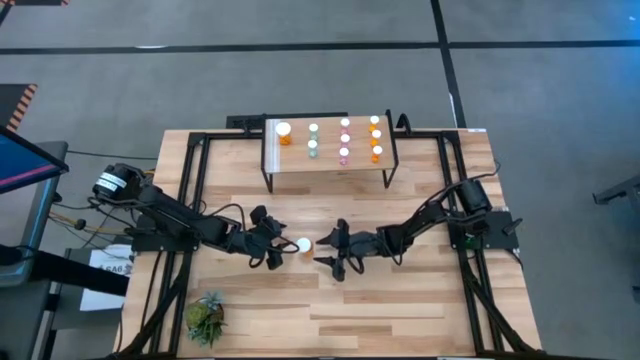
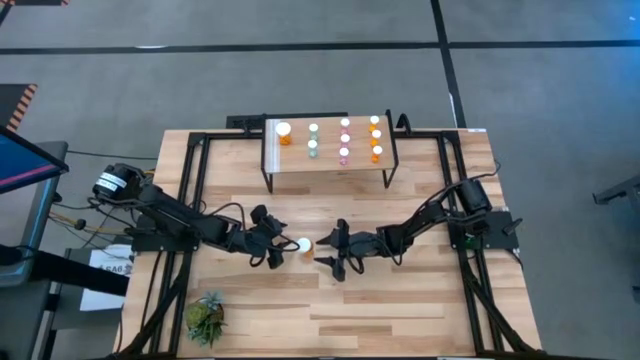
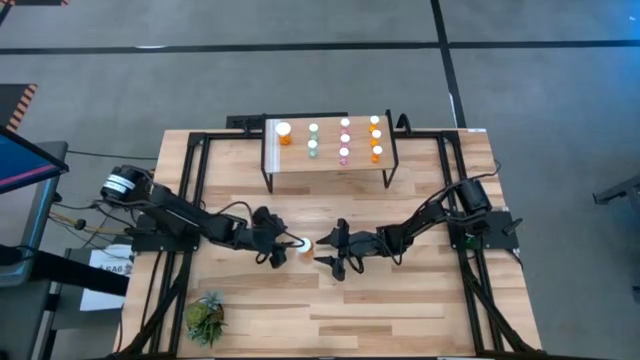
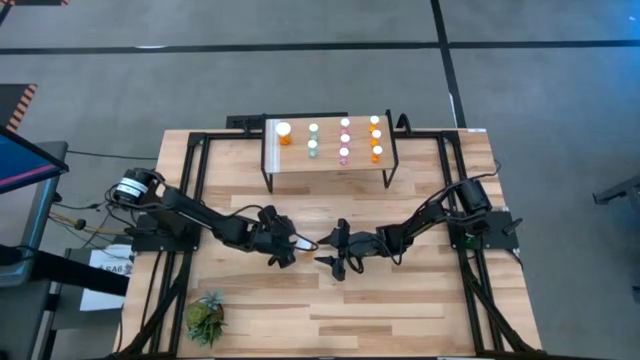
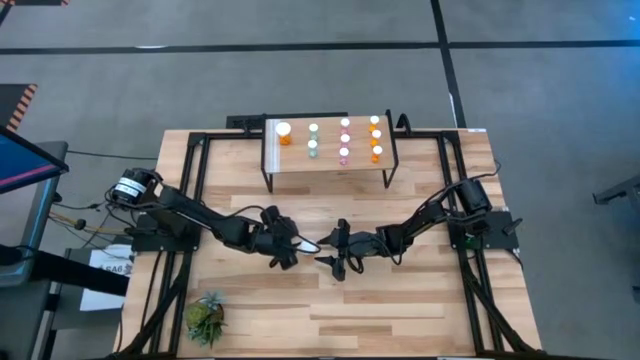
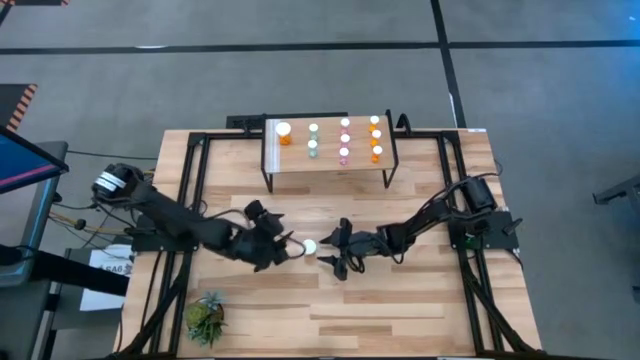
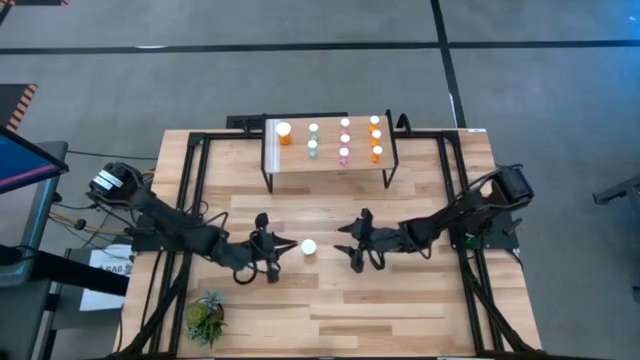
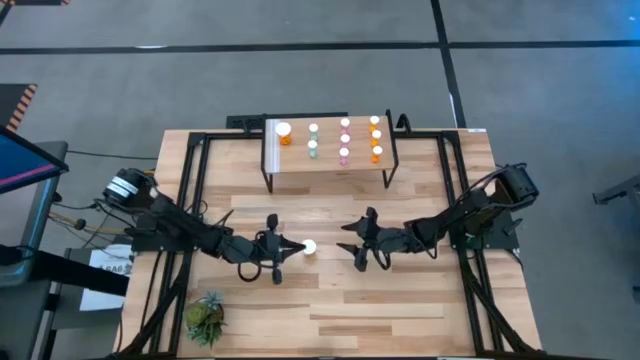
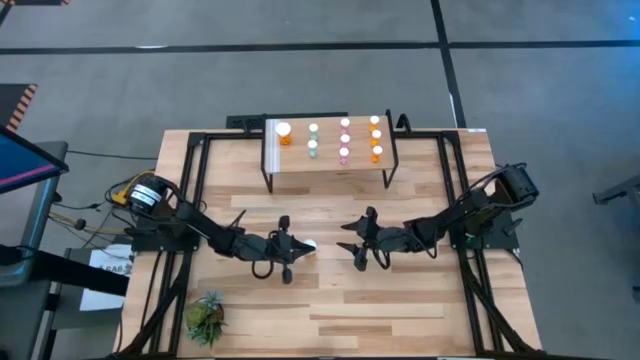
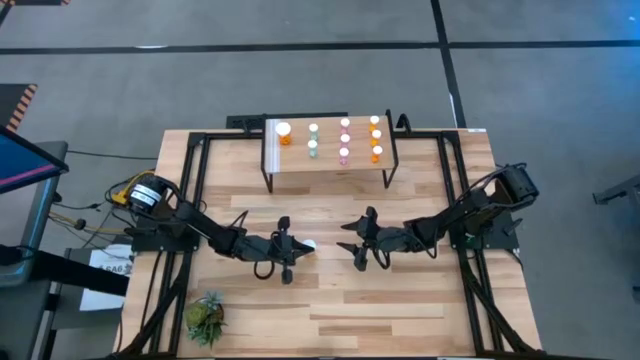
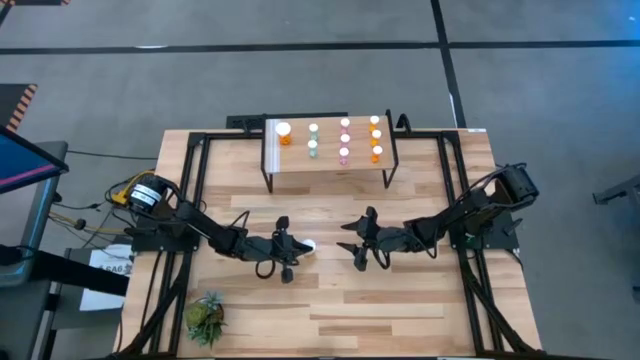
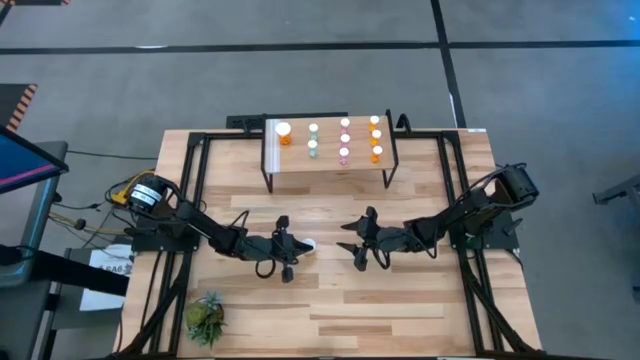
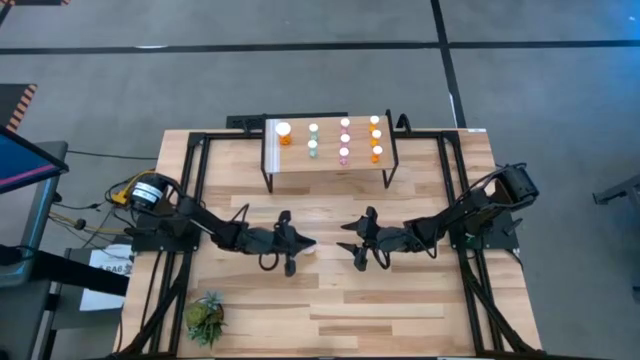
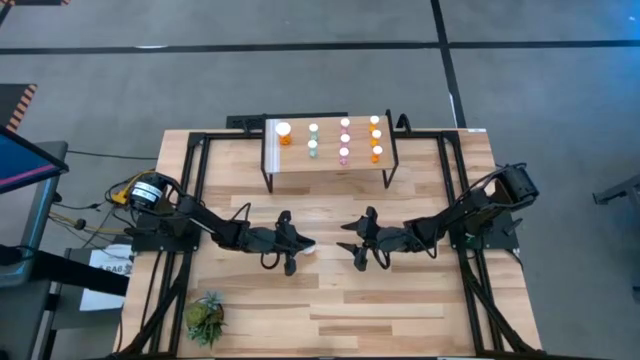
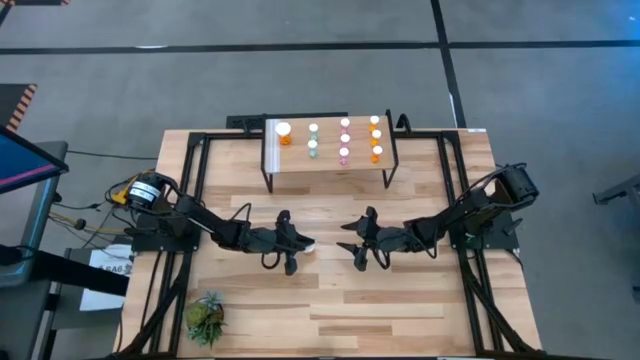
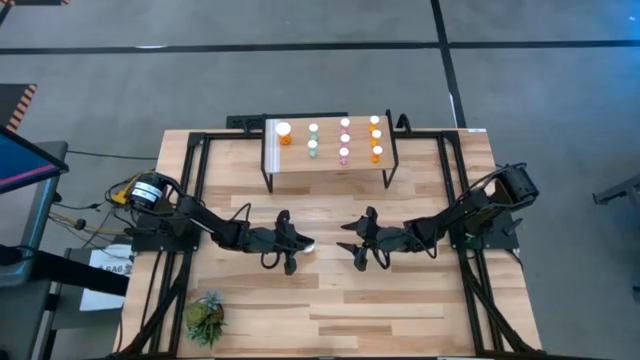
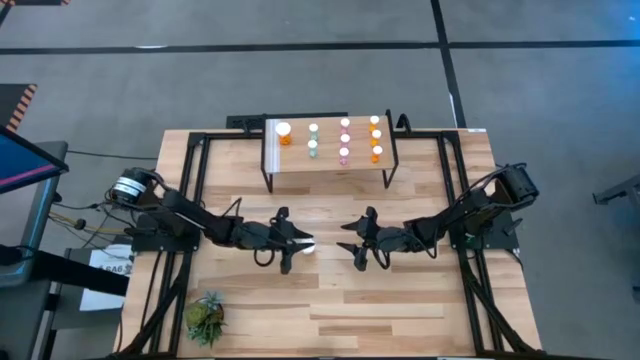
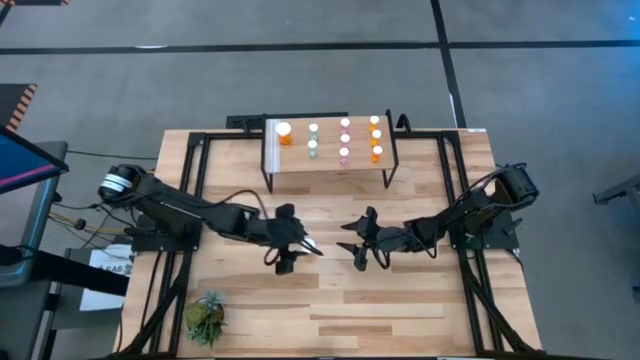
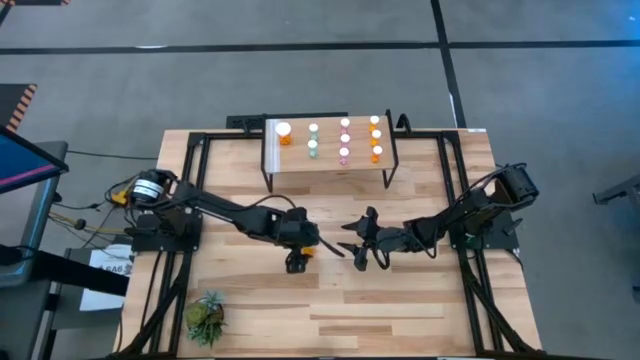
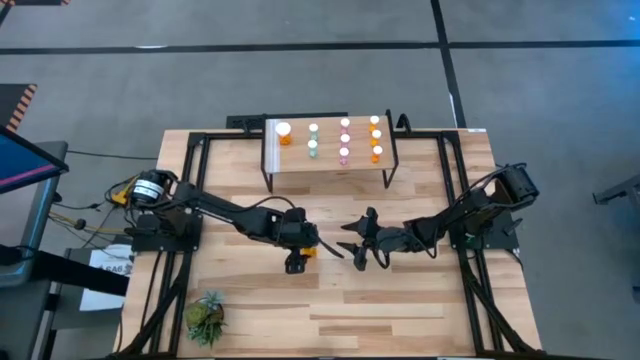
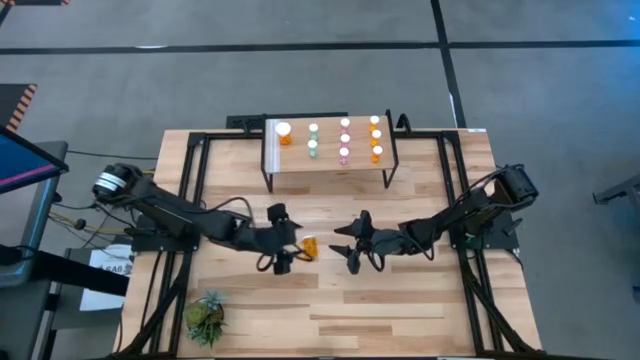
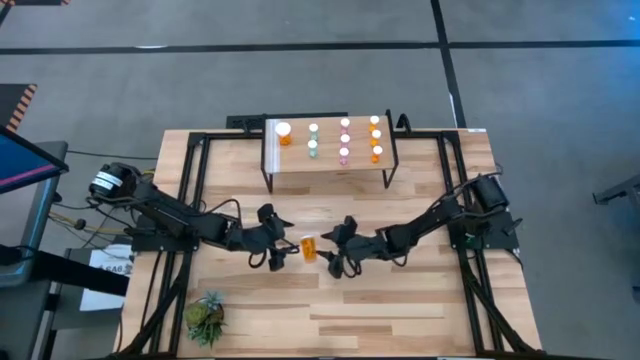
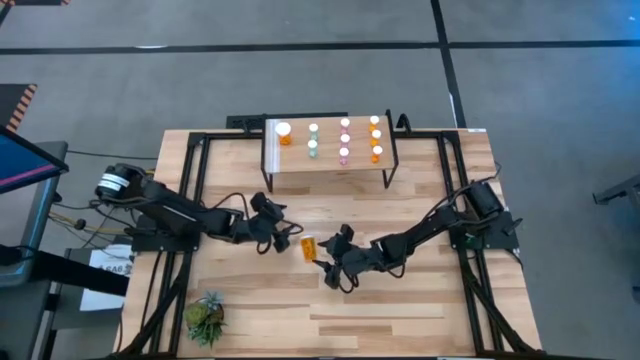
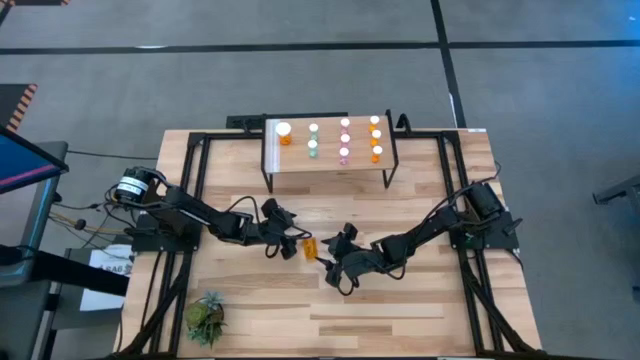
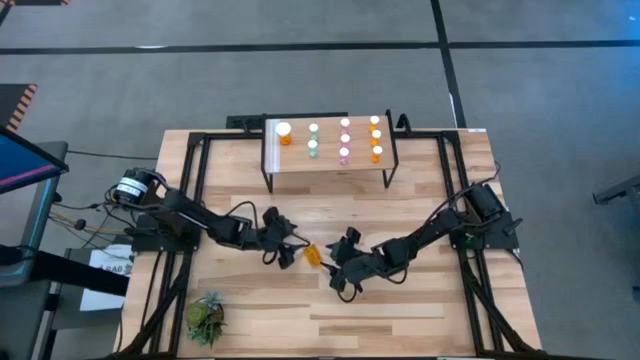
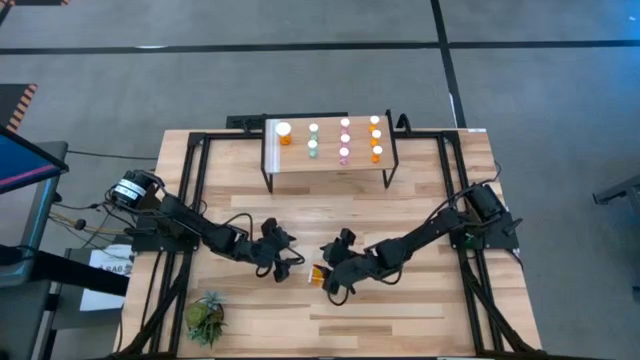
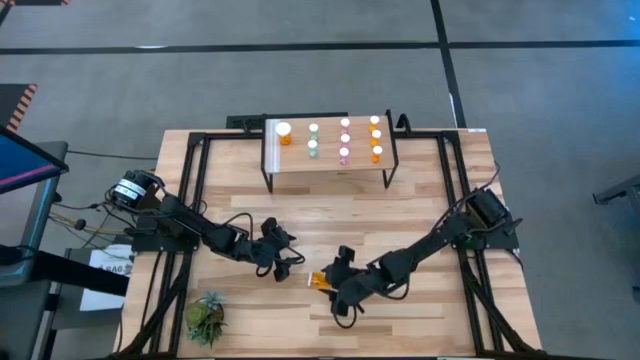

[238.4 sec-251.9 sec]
Task: Pick and place medicine bottles onto shelf by color
Put the large orange pill bottle on the shelf aligned with the other large orange pill bottle

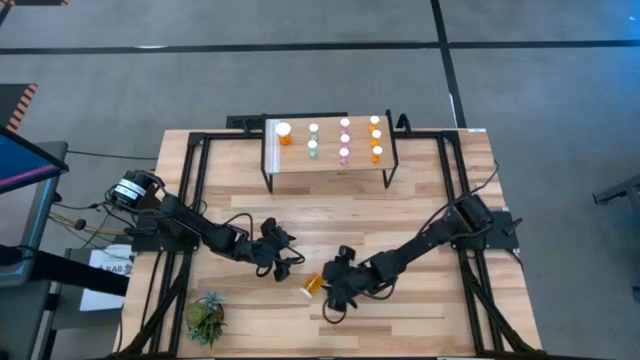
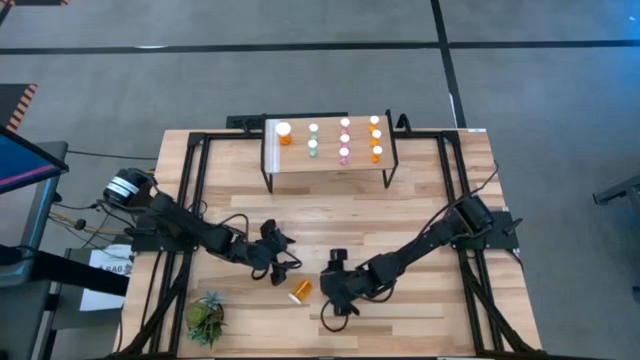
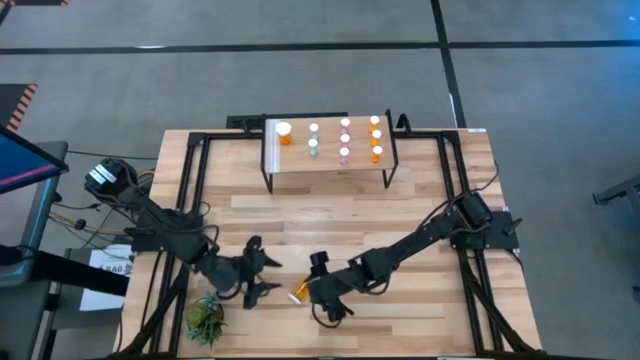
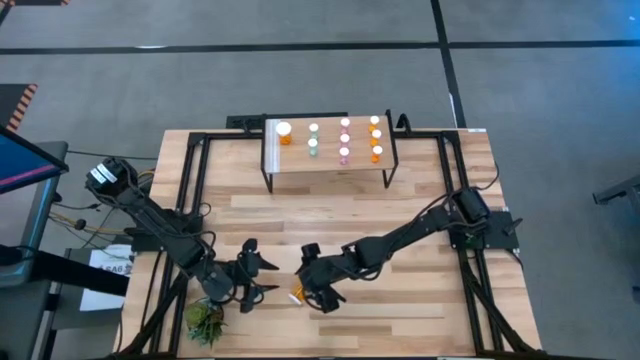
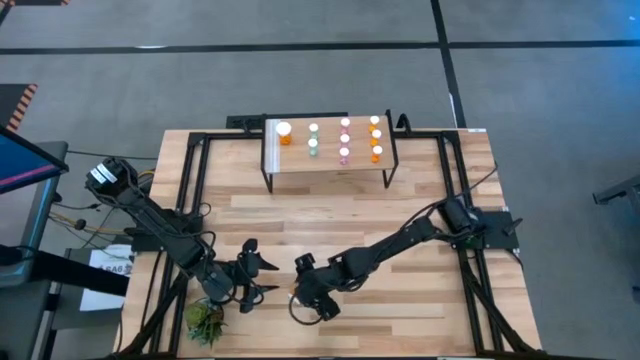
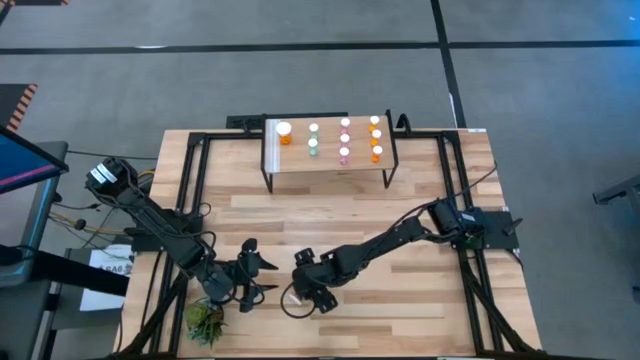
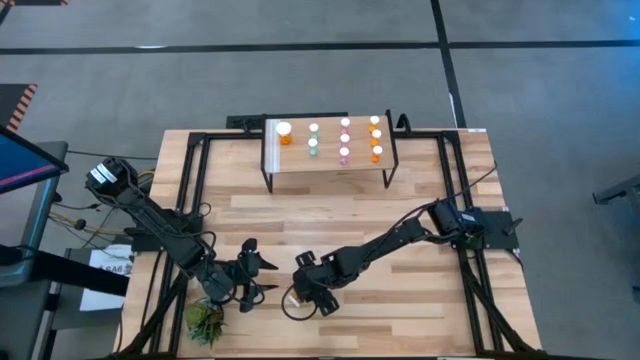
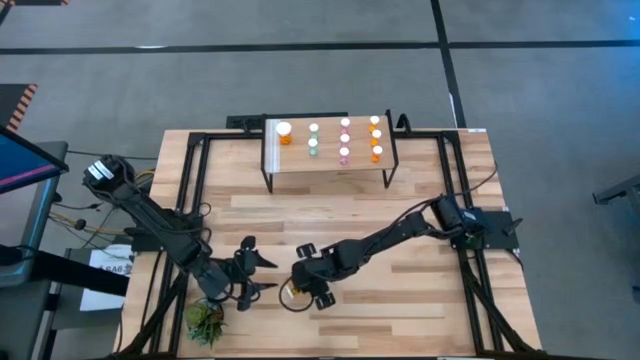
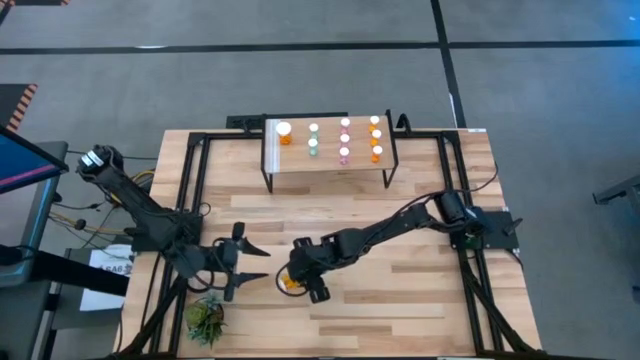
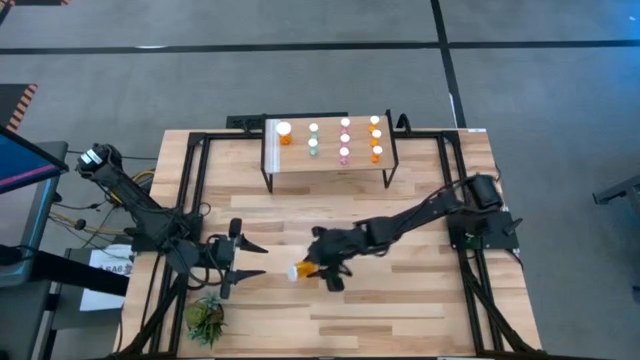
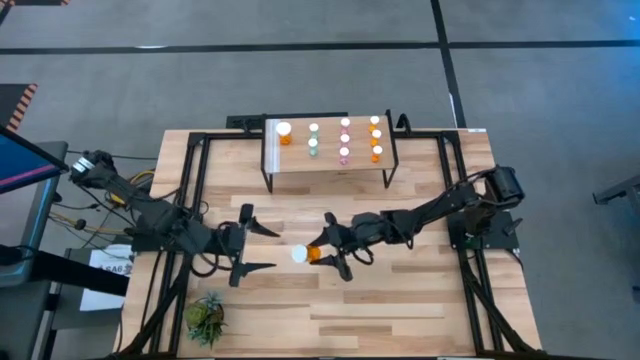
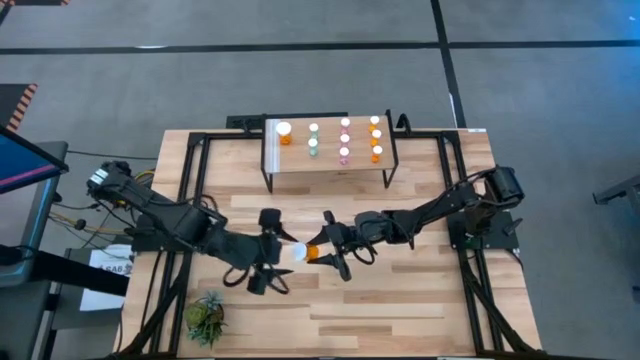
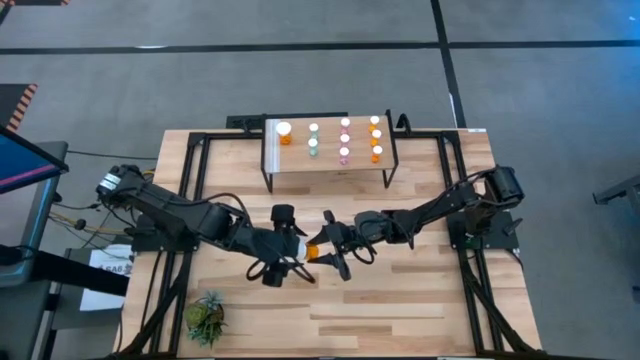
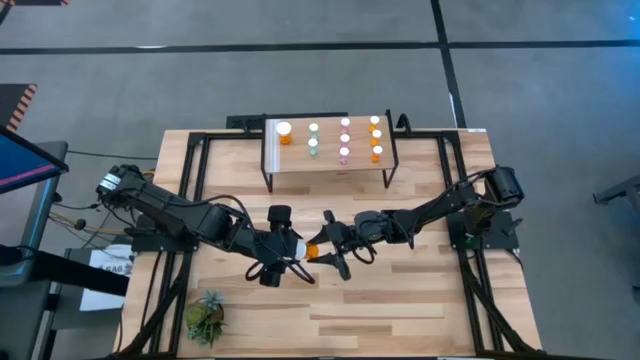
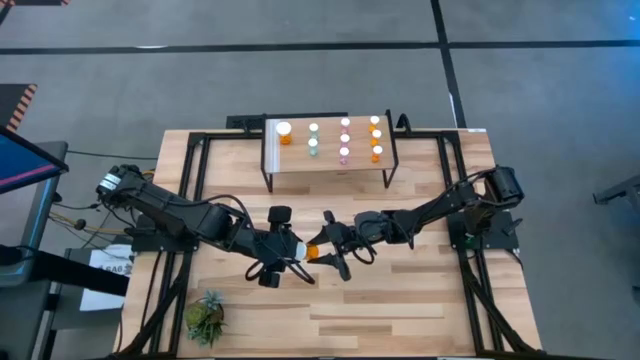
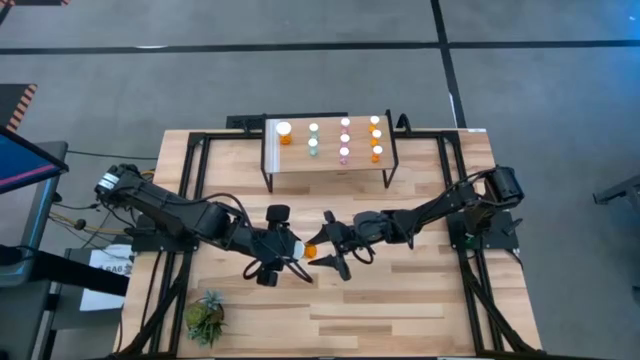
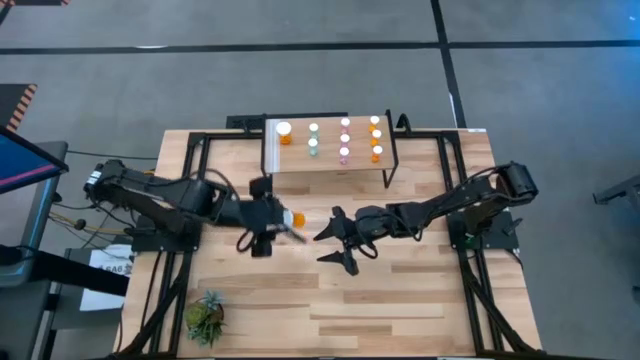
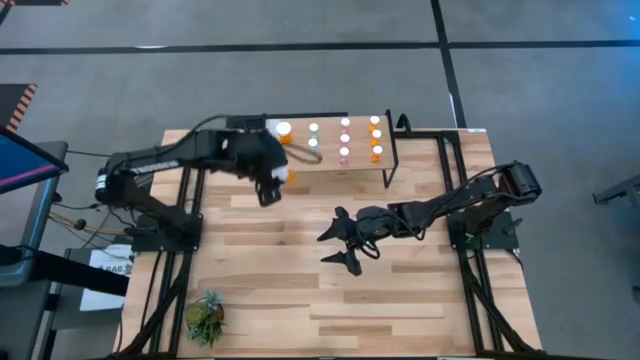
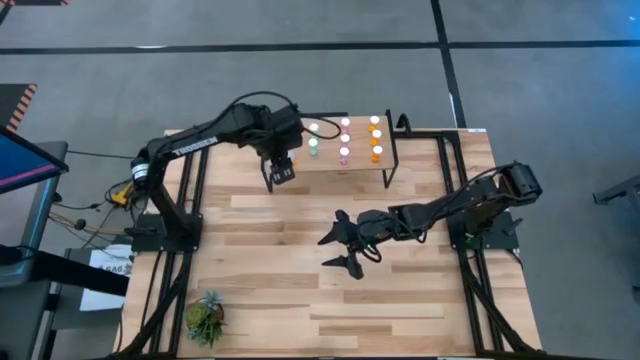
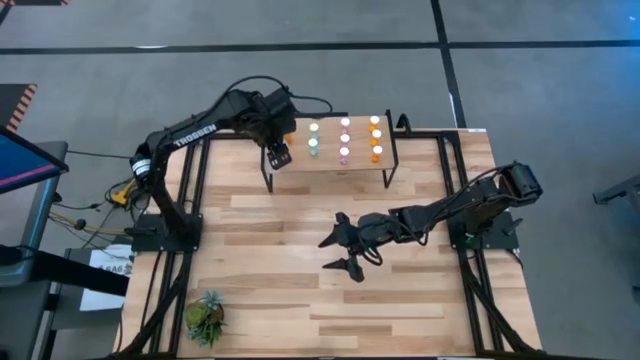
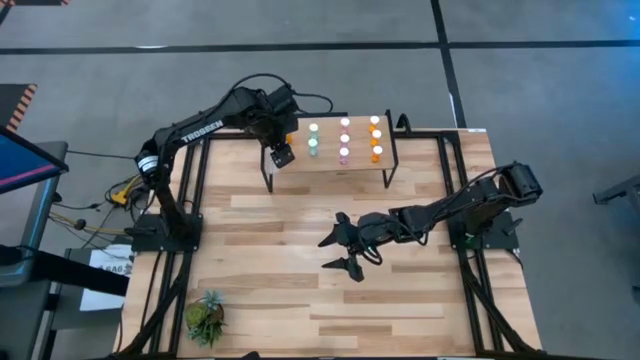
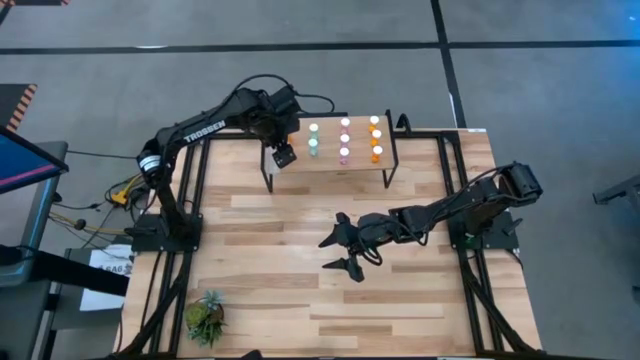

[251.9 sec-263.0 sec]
Put the large orange pill bottle on the shelf aligned with the other large orange pill bottle
